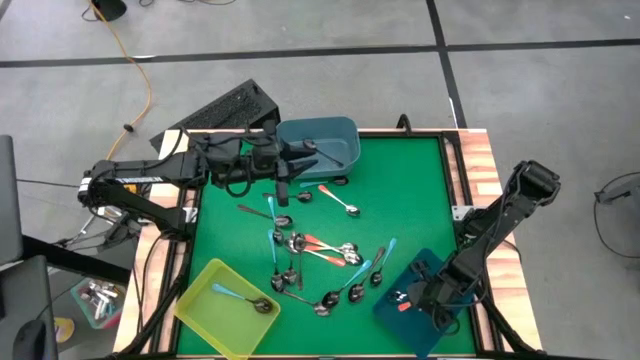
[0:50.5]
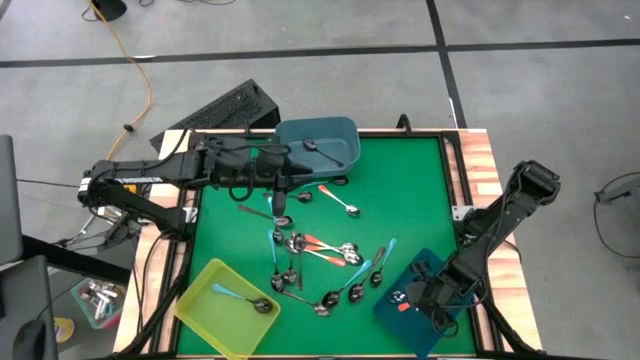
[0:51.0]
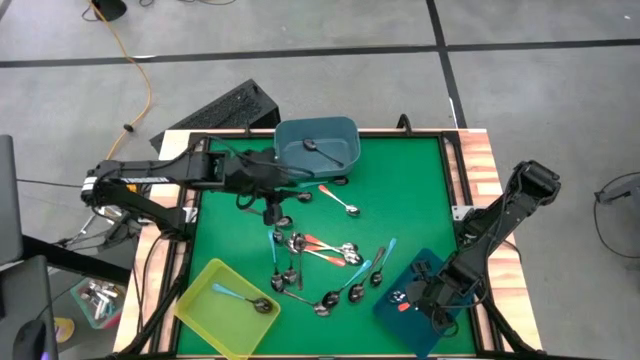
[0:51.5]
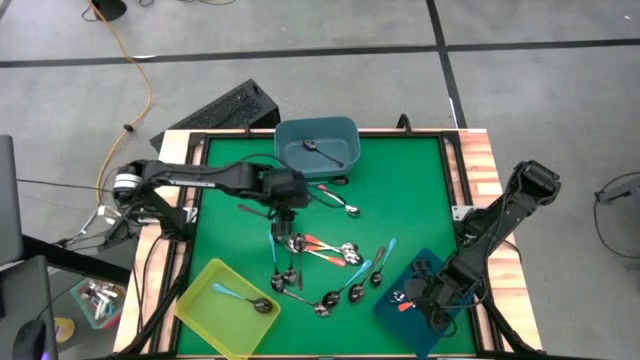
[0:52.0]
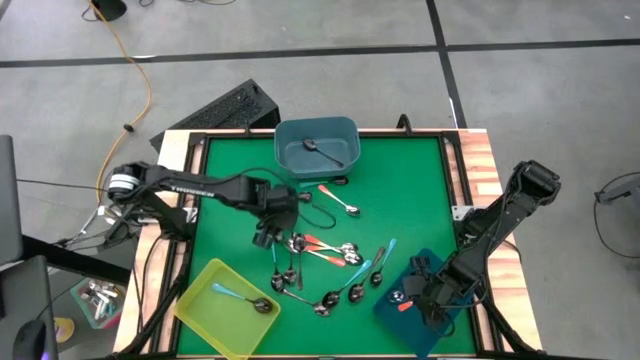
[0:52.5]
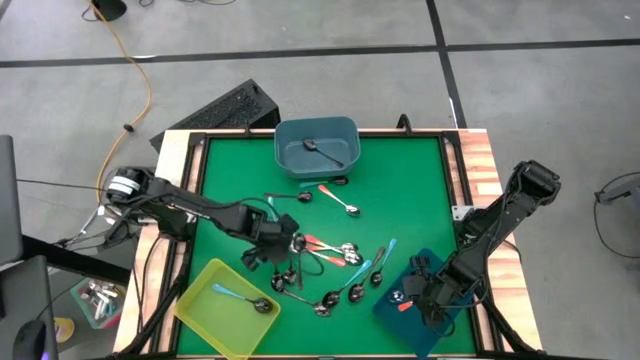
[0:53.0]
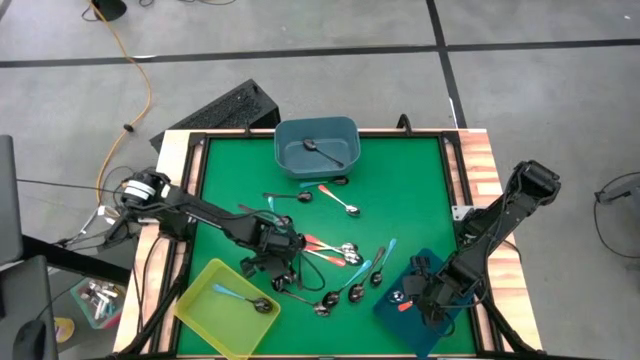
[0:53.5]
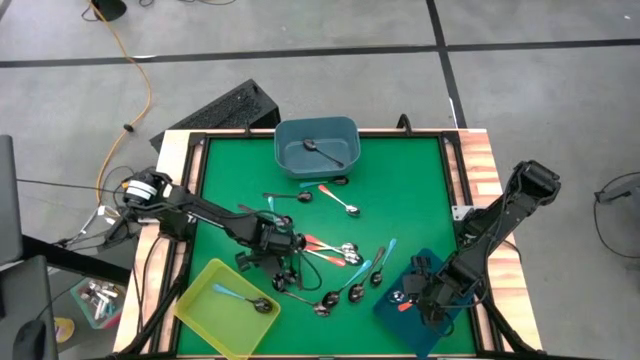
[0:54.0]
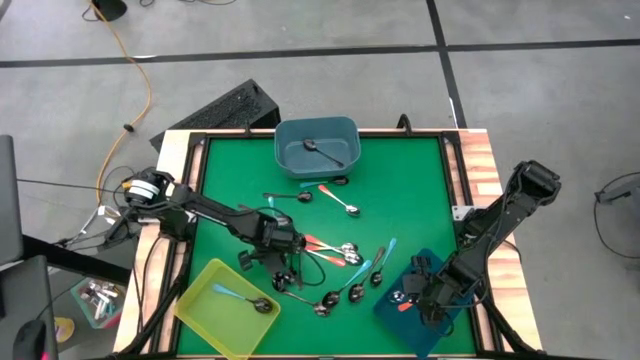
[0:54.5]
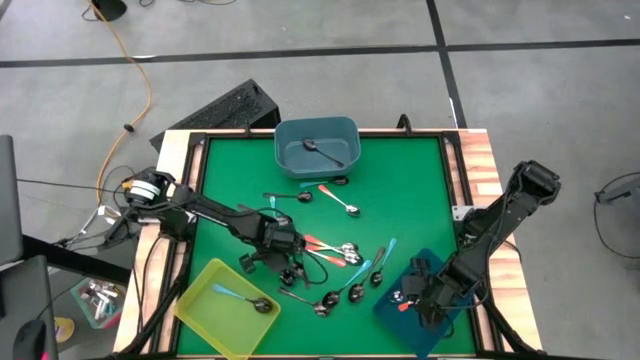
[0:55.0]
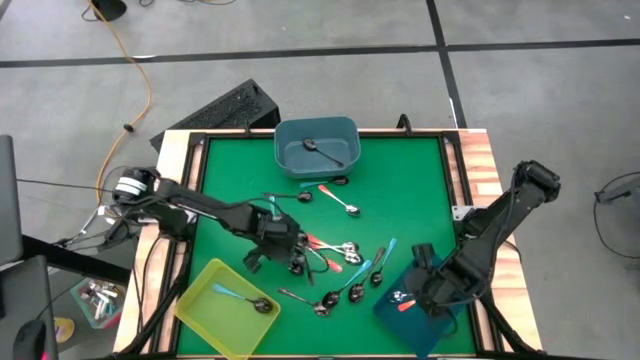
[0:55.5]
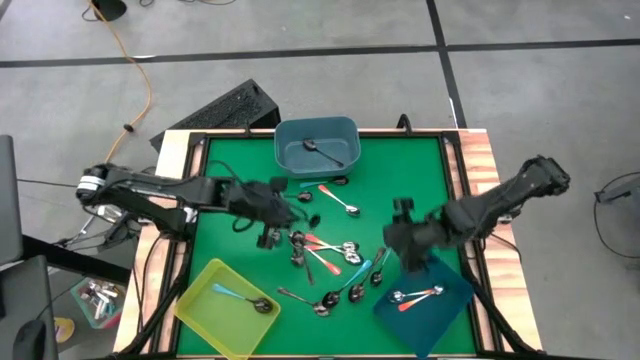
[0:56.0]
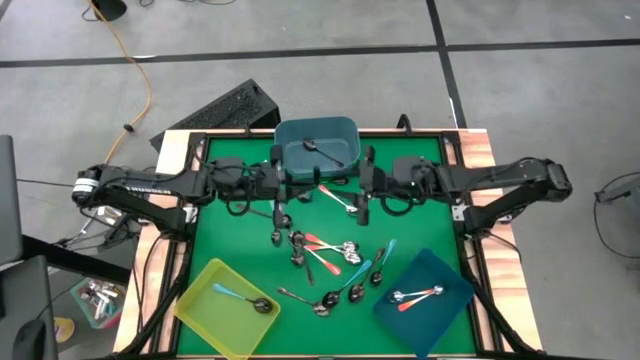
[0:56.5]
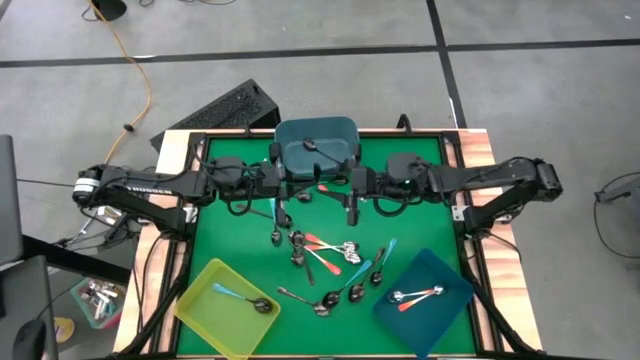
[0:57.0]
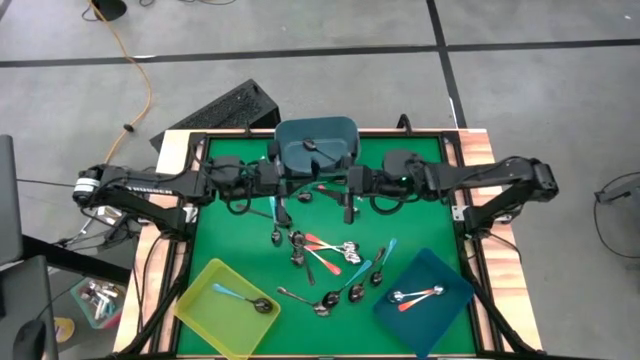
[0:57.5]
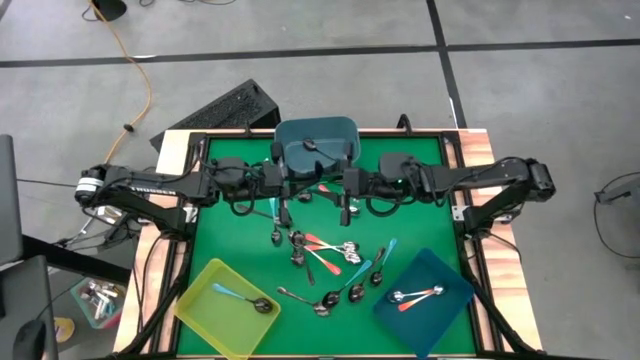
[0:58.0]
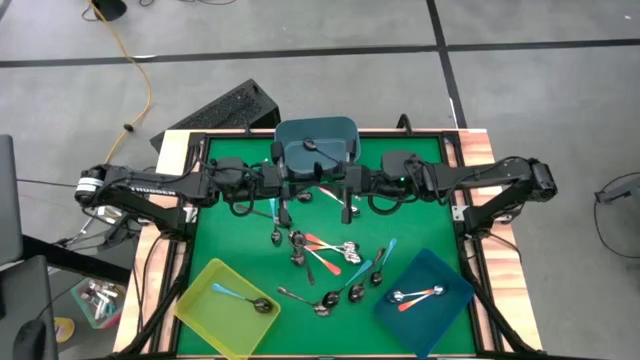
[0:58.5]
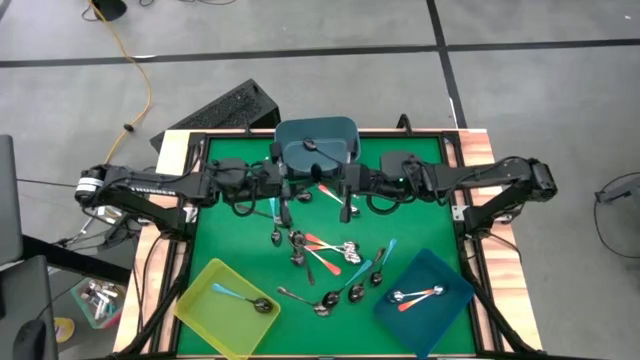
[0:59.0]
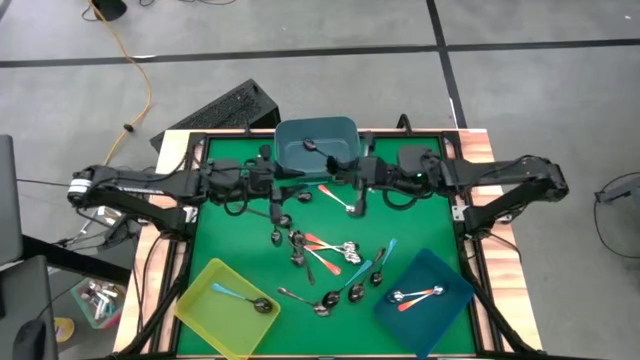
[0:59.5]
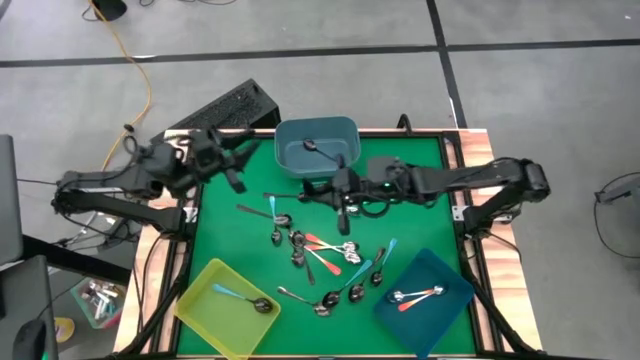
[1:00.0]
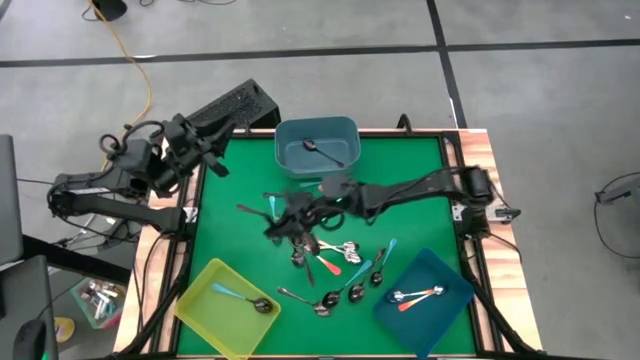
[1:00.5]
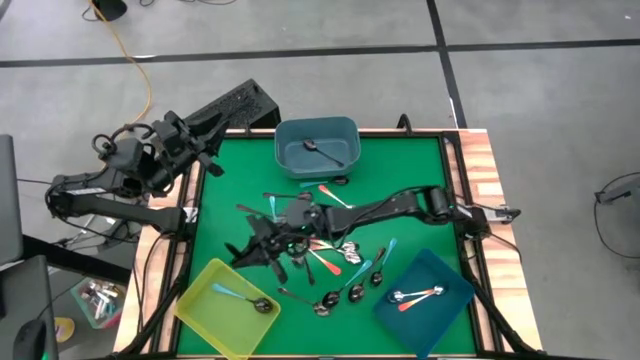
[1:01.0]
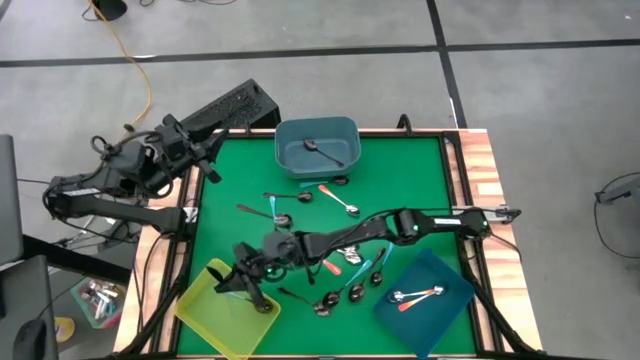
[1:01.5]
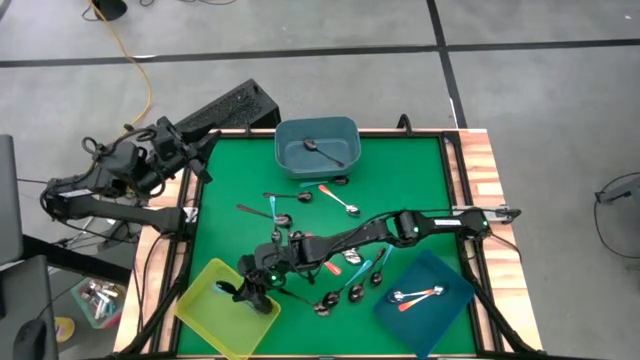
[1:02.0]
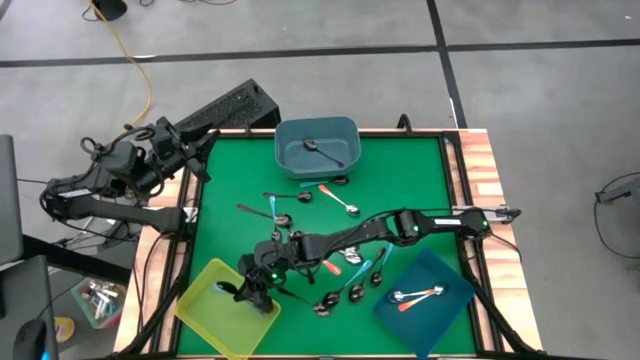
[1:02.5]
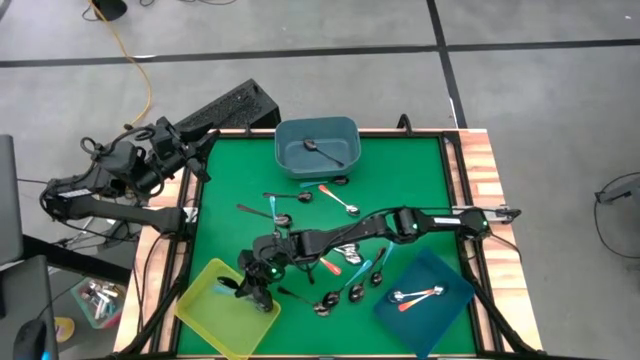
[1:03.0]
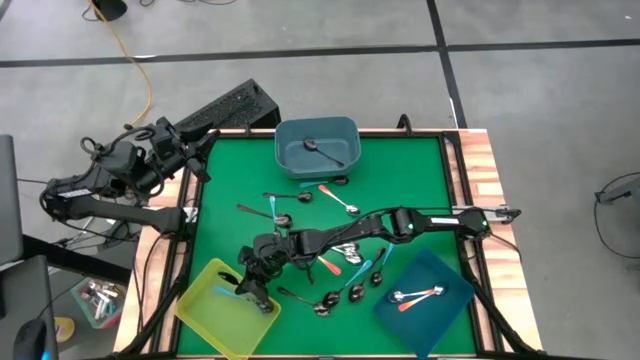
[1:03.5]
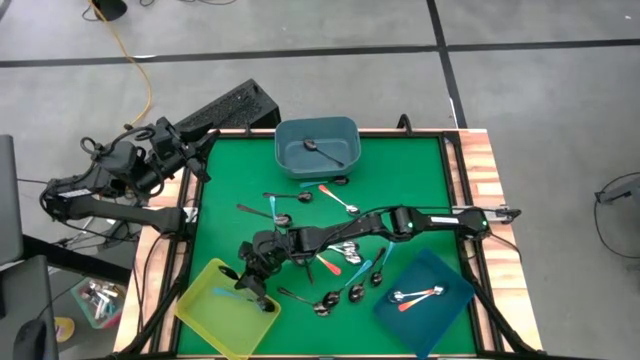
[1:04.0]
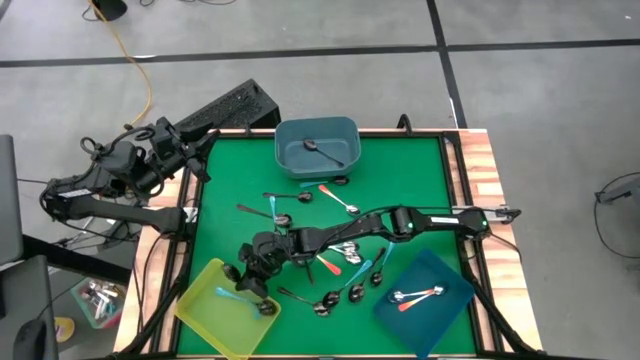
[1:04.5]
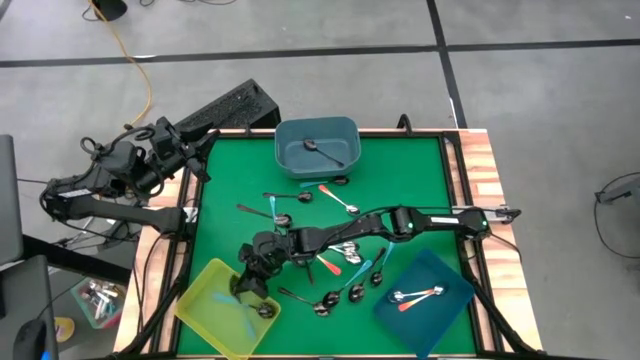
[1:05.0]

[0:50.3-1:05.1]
Task: Sort silverware by color (type)
Put the blue spoon into the yellow bin

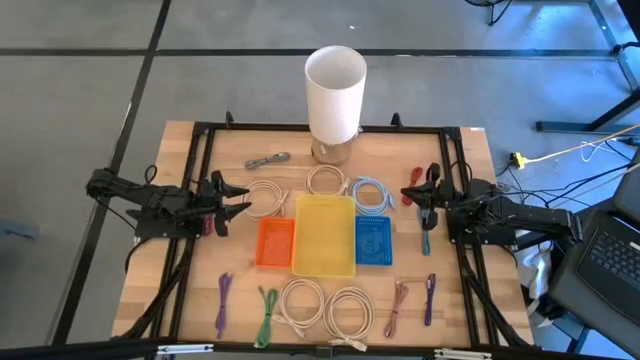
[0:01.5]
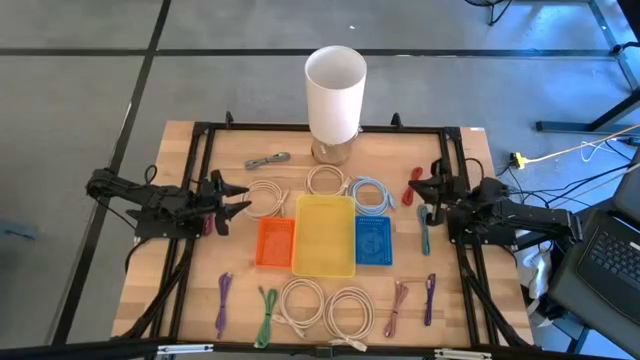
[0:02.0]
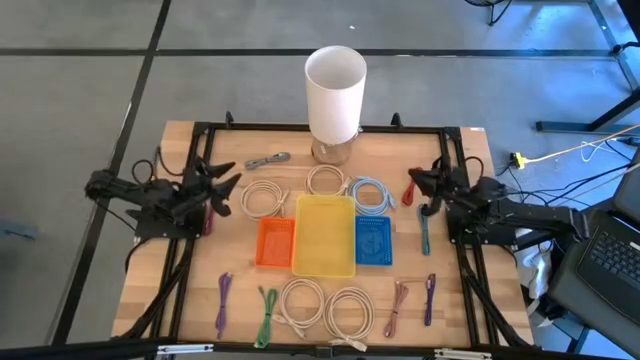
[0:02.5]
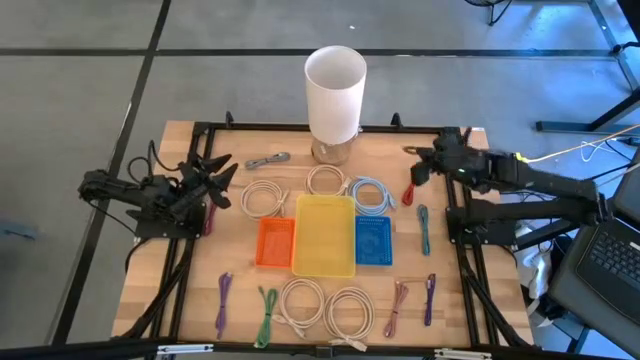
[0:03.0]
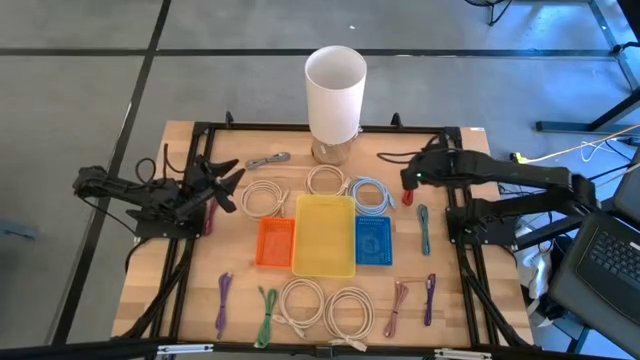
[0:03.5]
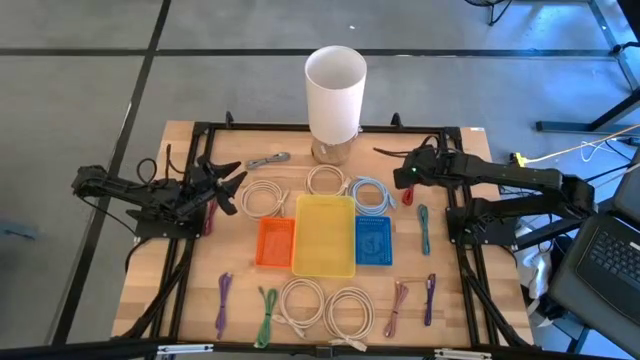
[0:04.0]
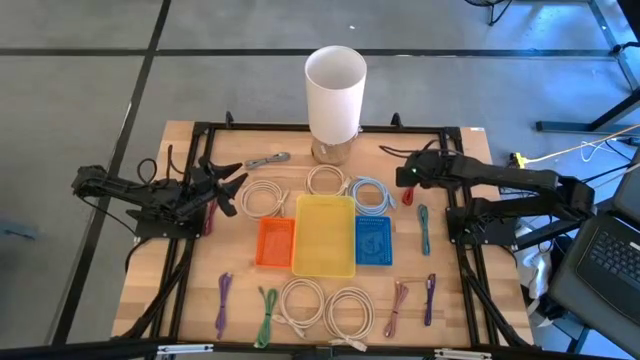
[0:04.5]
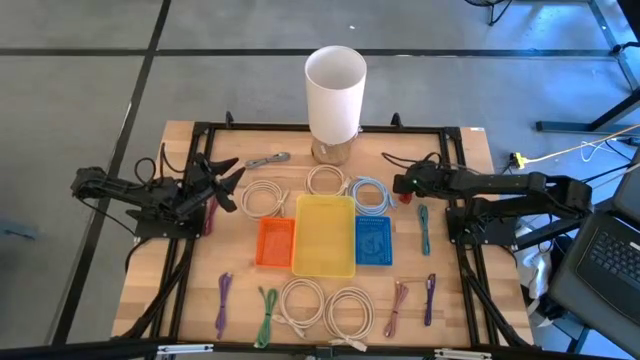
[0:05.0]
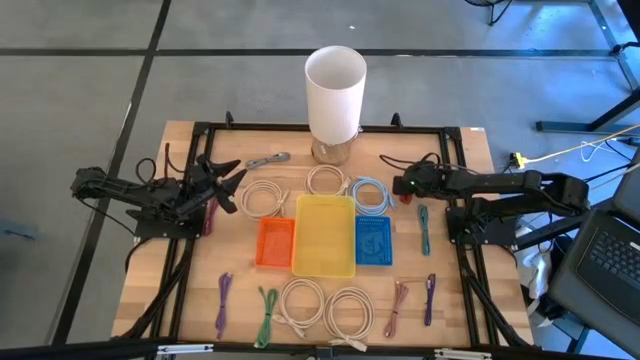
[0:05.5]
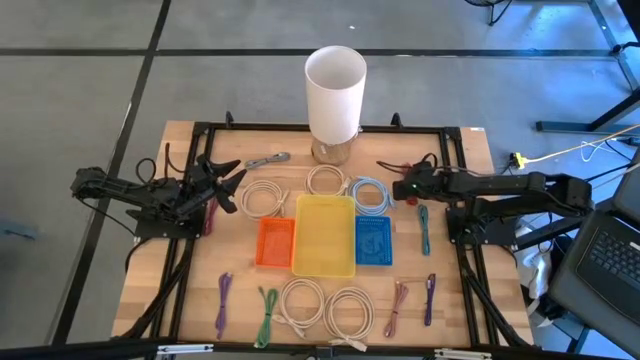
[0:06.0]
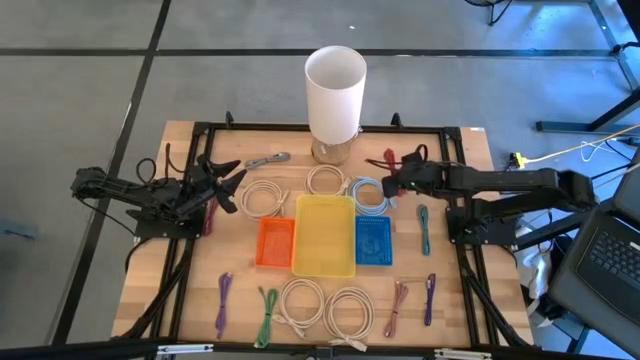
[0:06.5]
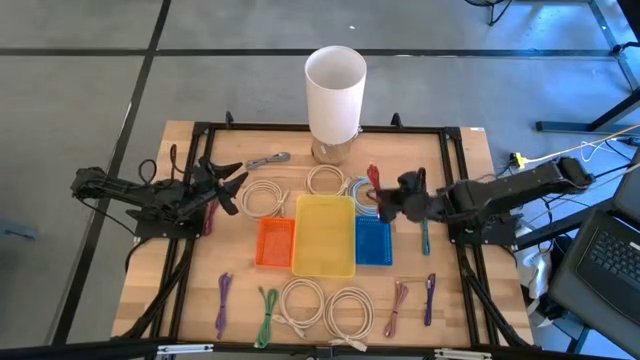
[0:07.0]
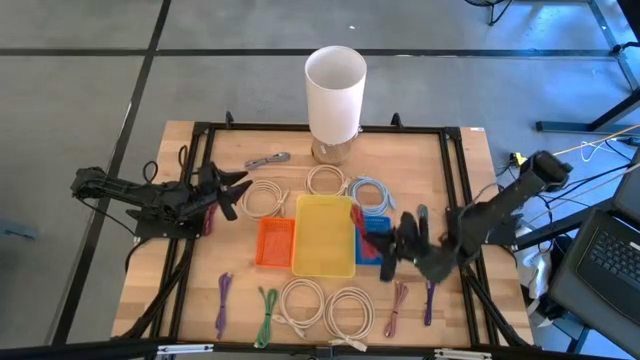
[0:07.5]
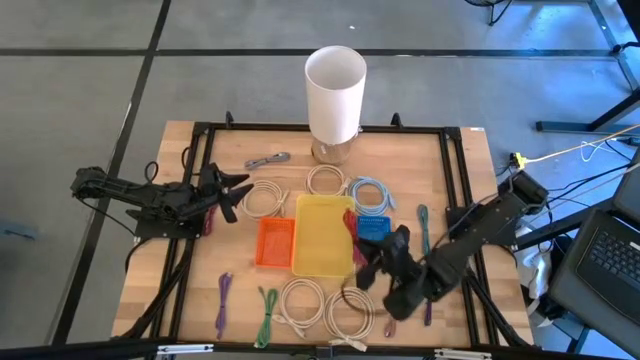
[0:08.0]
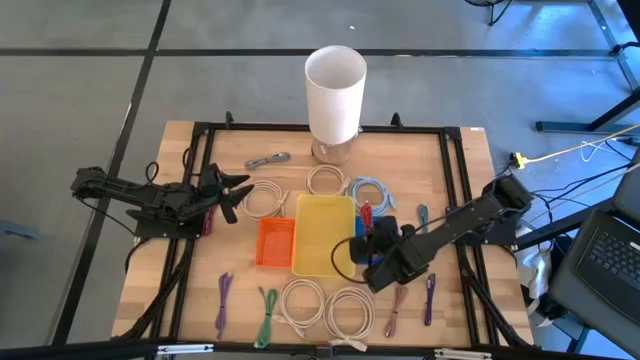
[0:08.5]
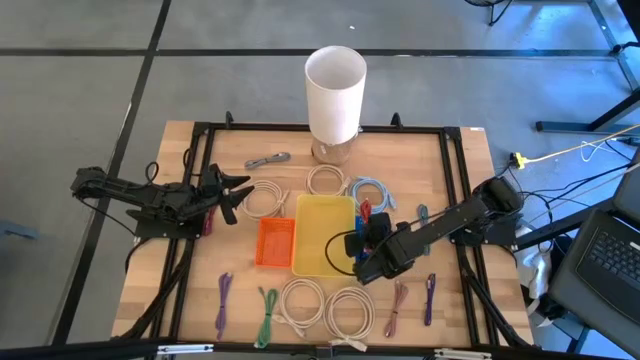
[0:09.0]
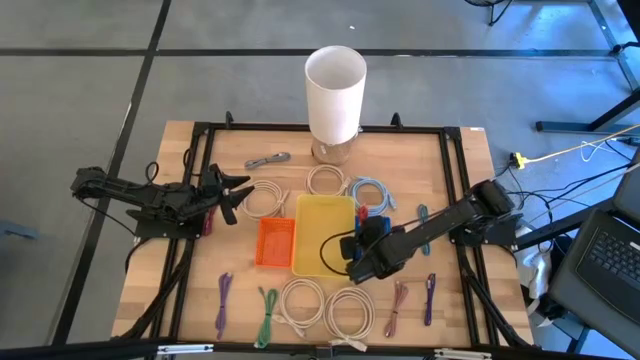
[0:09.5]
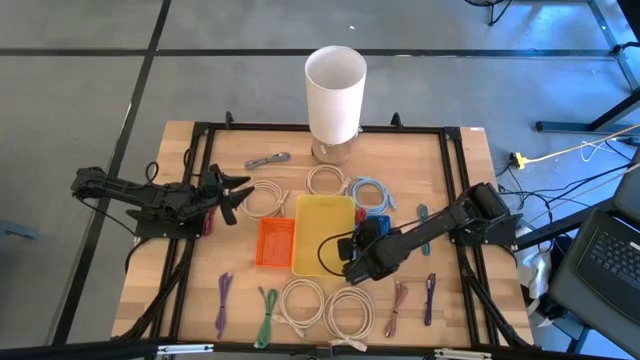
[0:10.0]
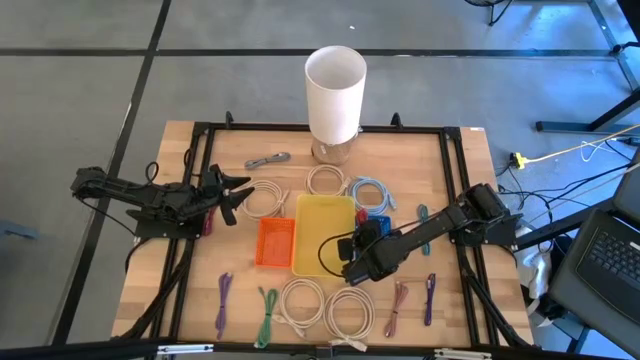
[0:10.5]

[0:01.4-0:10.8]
Task: Pick & Place USB Port
Put the small red charger cable into the blue bin
